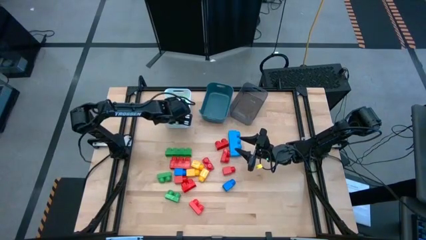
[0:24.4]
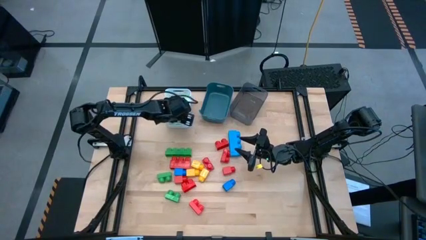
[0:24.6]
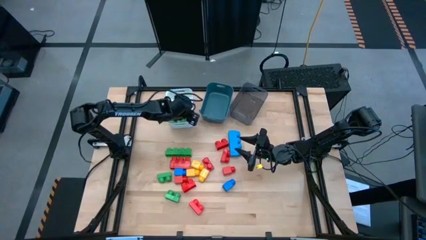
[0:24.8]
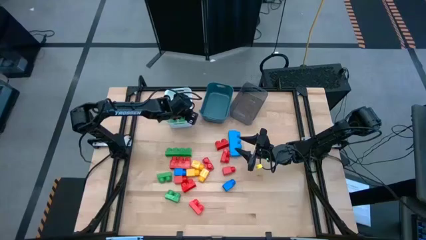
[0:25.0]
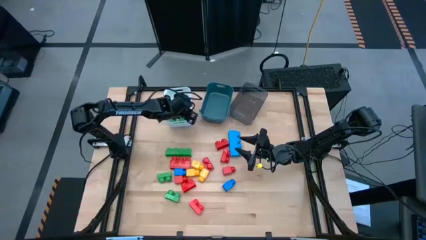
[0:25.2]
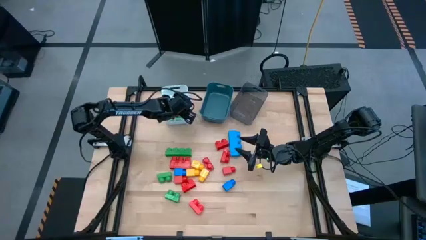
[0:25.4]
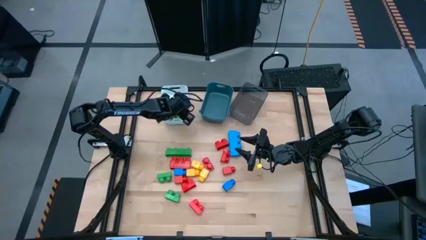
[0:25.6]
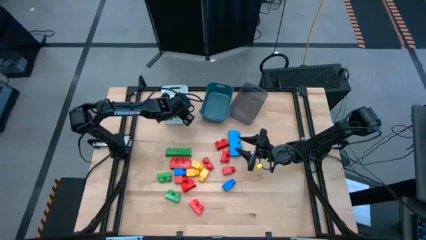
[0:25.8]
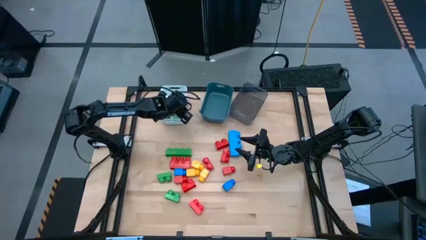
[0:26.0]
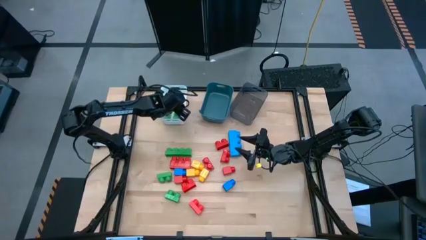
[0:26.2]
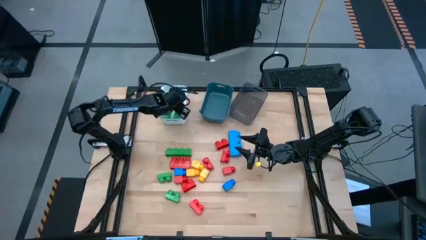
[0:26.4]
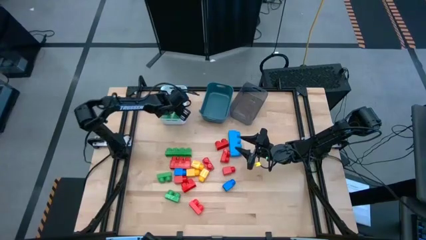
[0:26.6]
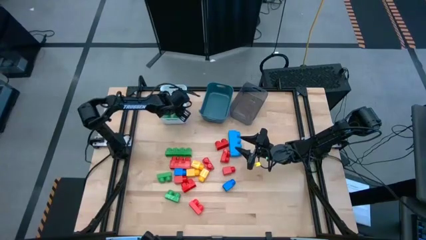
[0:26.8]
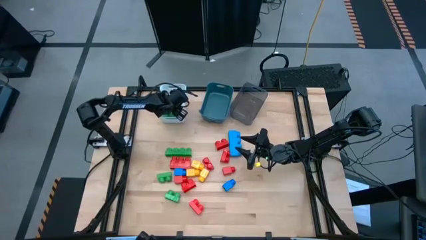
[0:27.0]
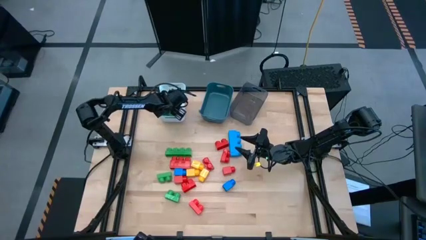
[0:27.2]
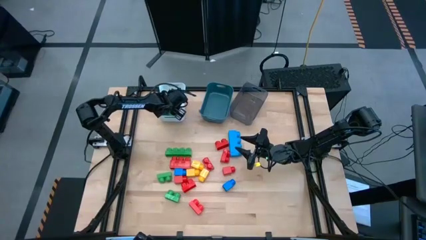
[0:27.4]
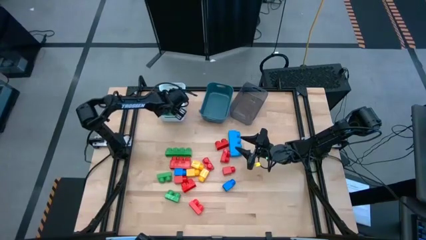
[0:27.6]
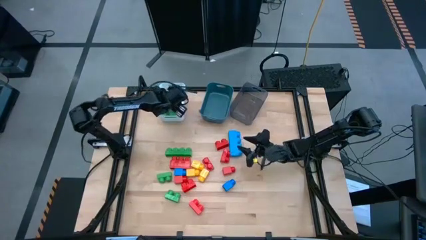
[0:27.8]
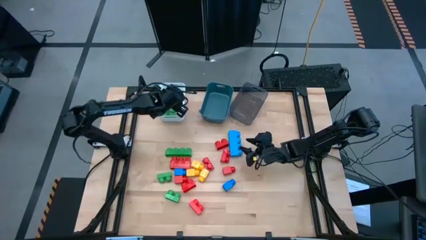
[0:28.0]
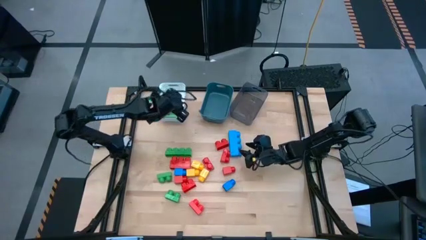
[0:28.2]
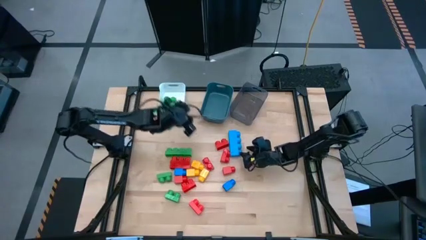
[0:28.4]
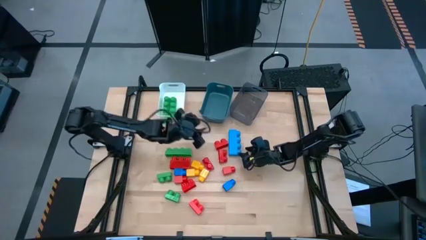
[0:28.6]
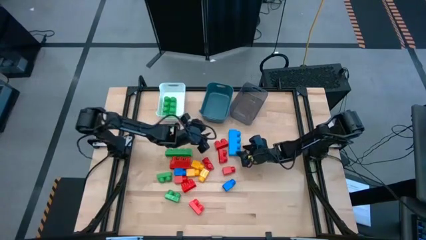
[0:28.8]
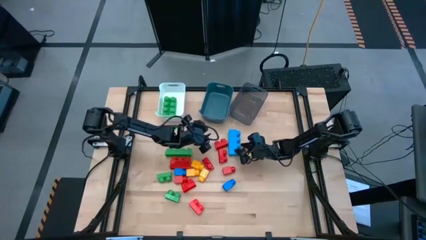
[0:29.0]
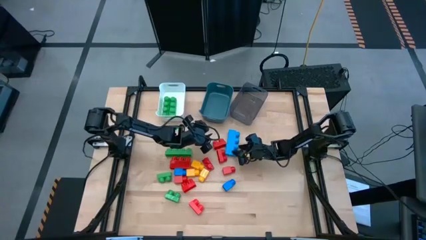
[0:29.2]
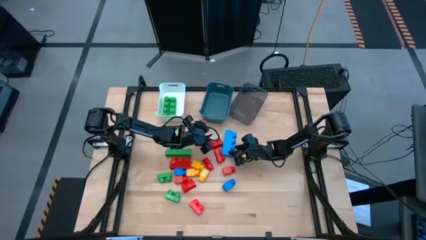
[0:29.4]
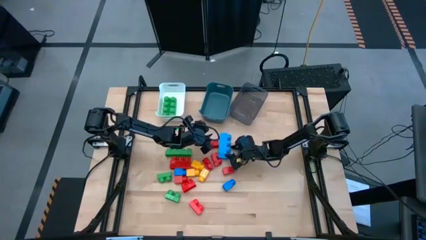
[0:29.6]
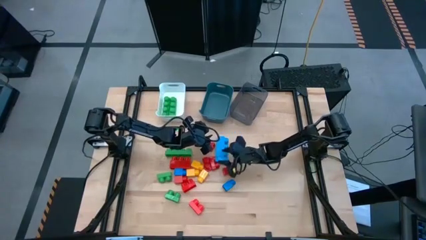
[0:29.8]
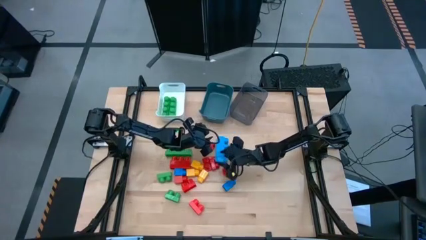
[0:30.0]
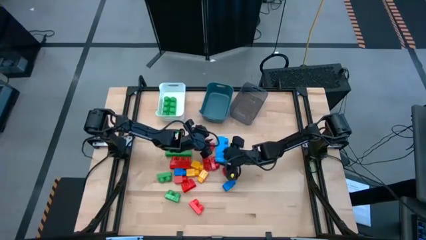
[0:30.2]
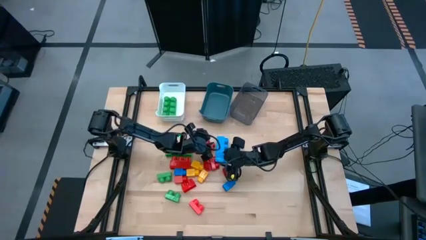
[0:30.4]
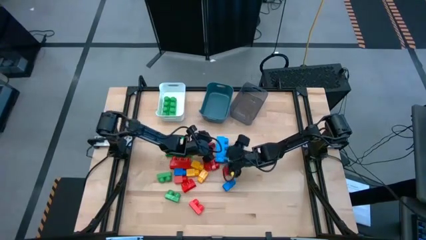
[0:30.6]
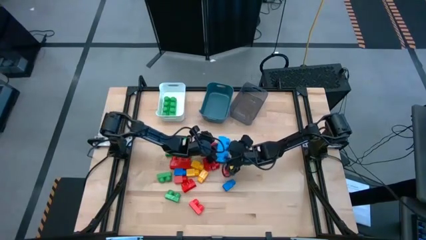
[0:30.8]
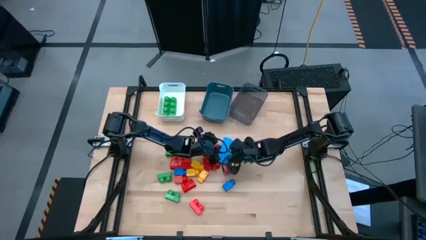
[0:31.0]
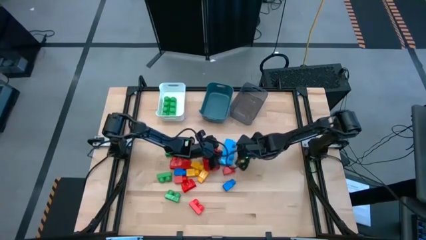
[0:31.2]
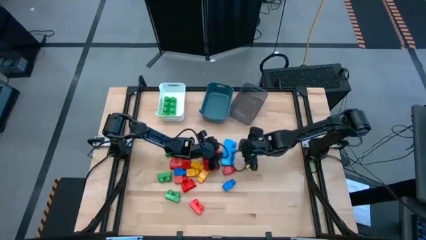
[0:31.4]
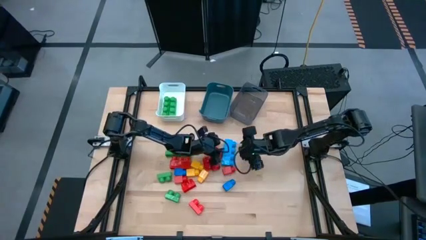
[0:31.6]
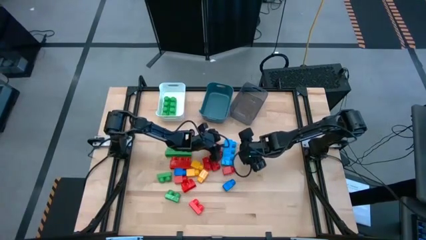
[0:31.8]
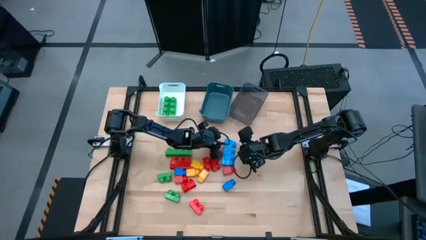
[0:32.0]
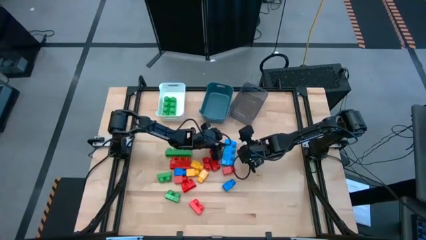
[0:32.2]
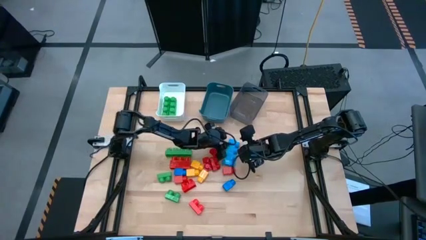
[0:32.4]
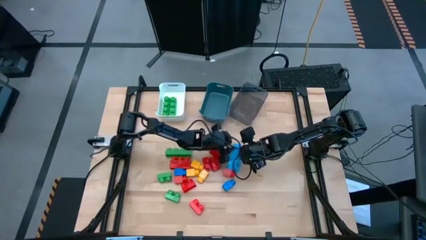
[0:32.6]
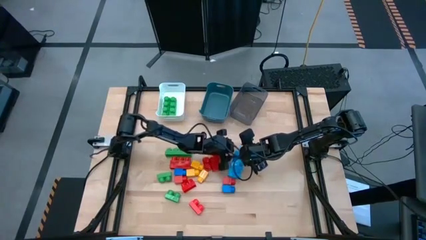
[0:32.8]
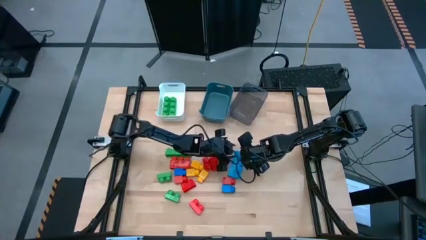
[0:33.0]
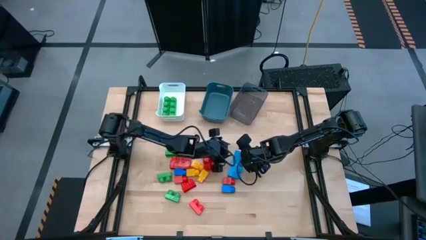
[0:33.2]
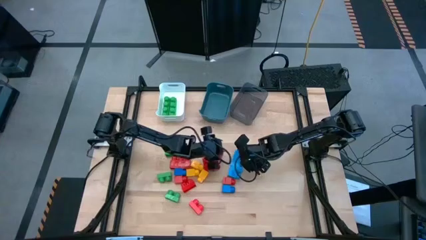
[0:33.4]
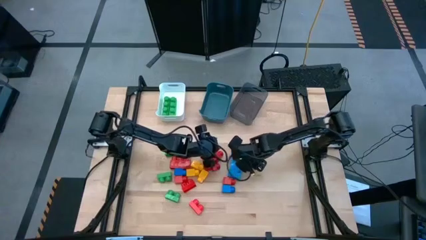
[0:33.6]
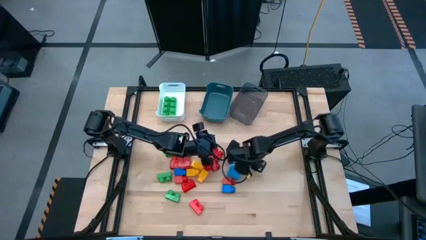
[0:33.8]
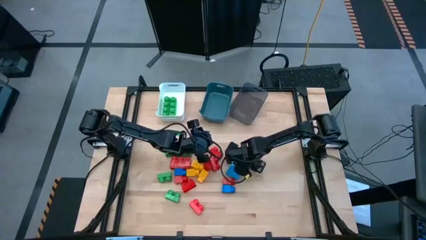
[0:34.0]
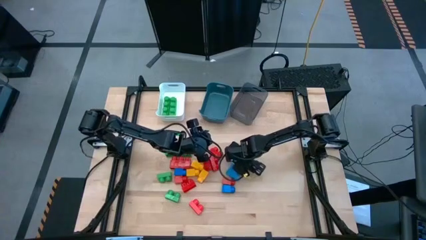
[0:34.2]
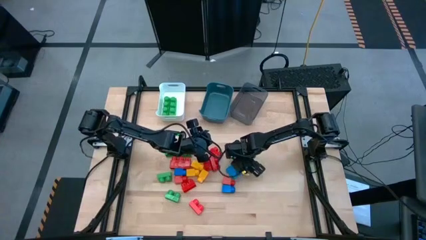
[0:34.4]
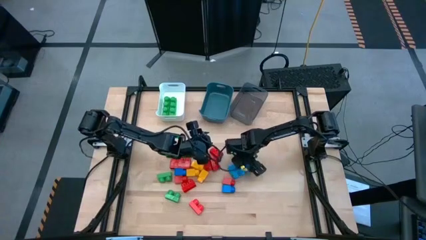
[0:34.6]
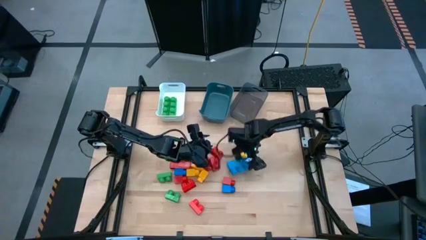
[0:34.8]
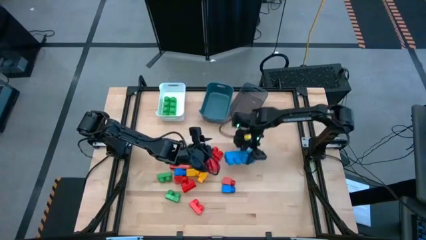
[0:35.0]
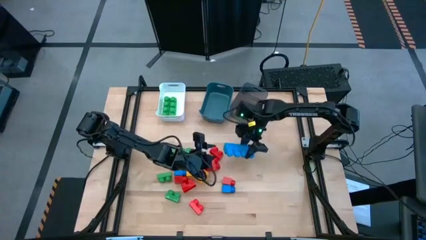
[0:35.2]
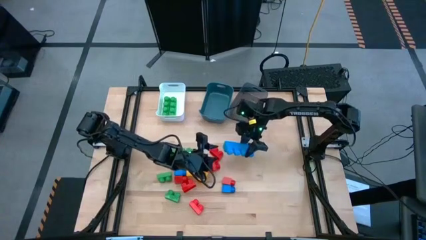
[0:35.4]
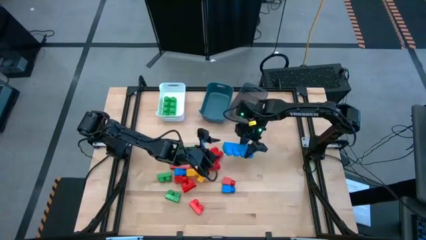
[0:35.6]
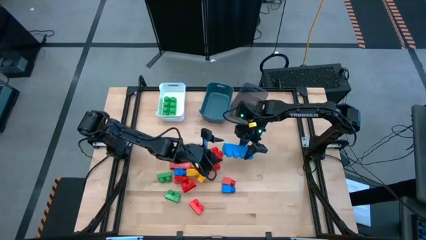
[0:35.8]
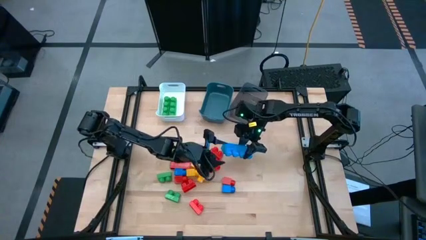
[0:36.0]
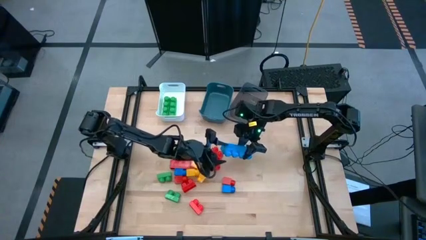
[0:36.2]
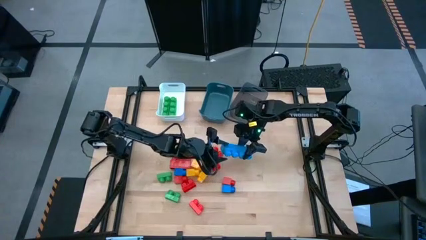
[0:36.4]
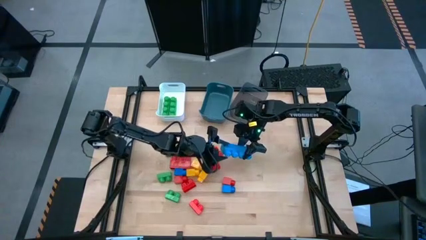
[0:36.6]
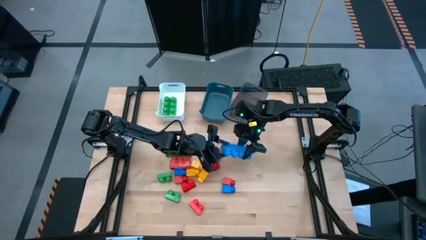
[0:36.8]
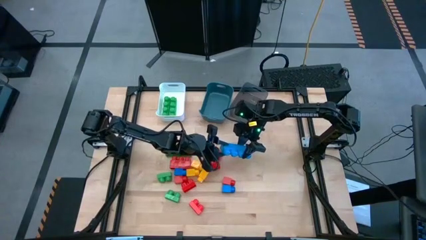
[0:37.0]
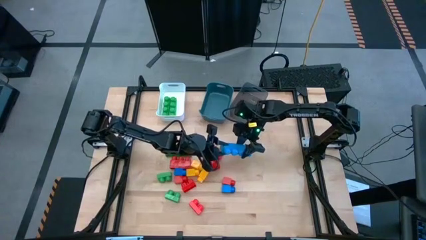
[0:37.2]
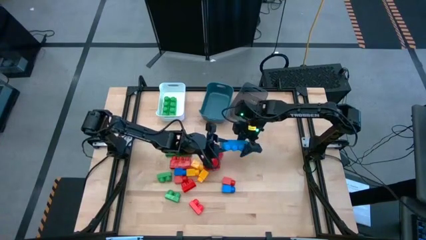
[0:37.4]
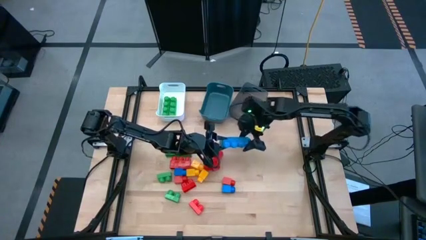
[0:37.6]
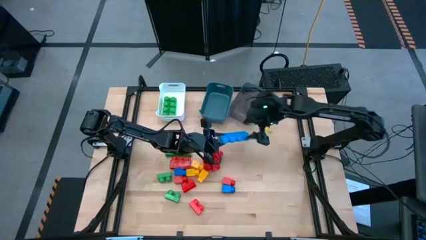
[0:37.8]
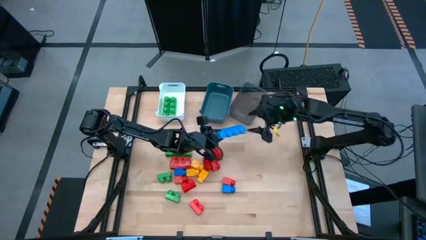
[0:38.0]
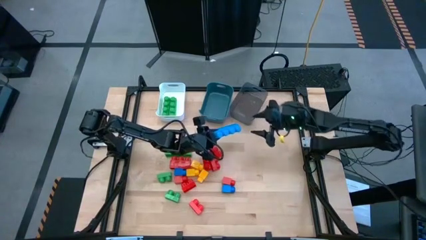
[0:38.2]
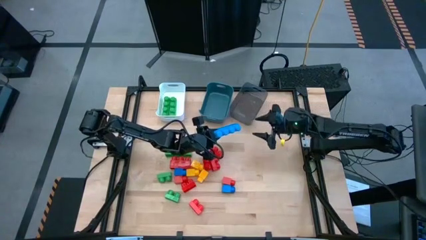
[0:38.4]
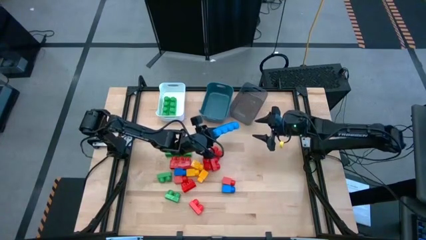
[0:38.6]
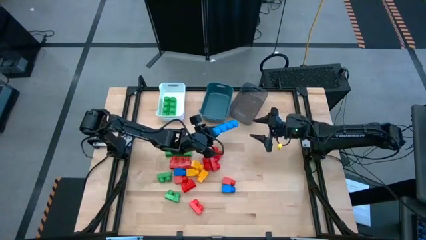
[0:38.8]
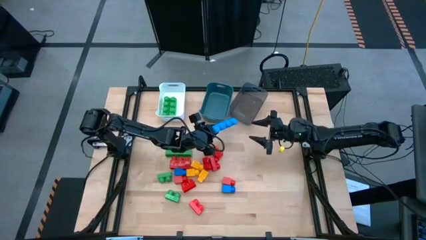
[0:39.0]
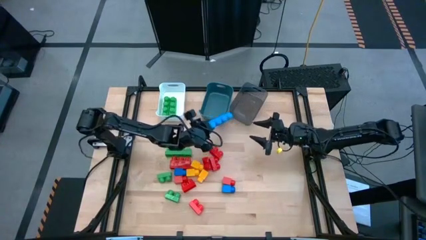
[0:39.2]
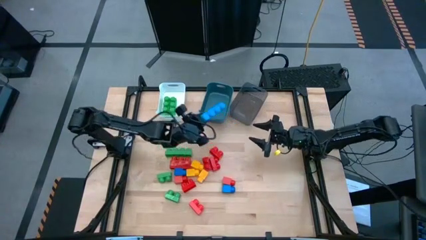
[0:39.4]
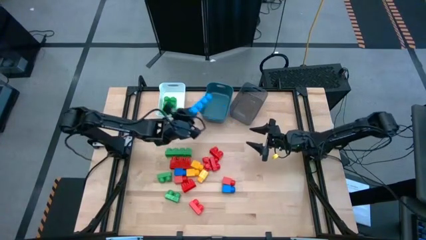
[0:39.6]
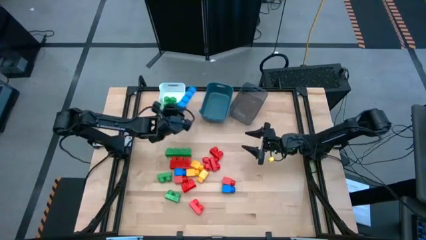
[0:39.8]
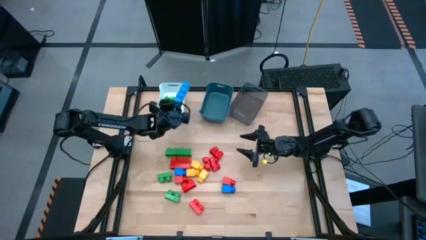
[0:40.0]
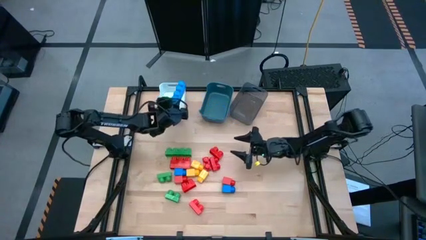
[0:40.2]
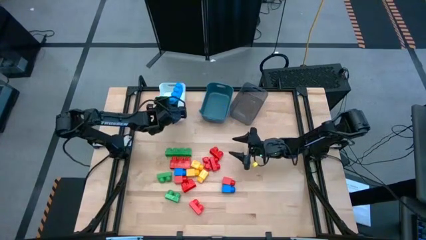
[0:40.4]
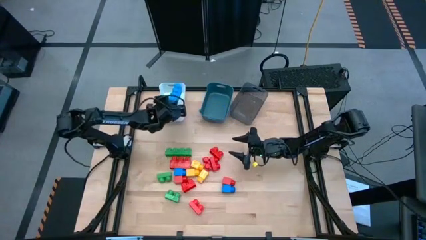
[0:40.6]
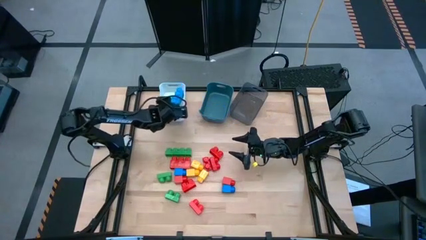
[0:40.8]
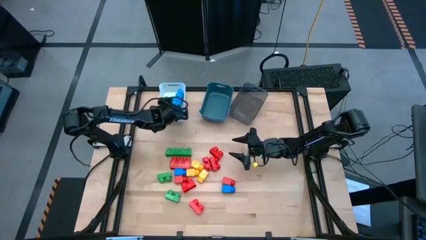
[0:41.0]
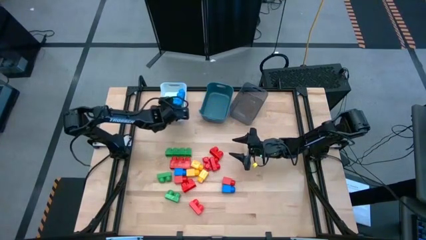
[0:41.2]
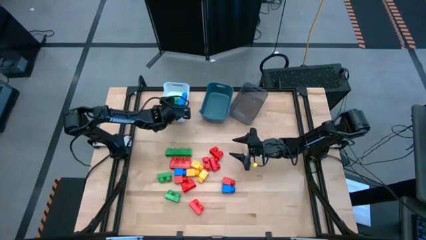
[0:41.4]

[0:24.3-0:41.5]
Task: Sort blocks by size
Put the 4 studs blue game piece into the white bin
